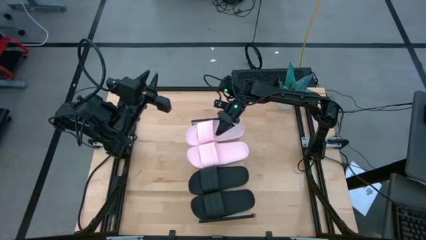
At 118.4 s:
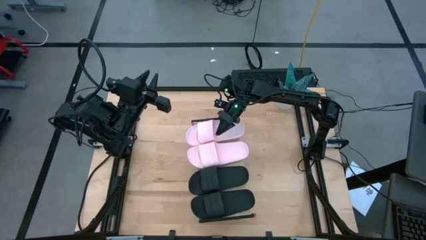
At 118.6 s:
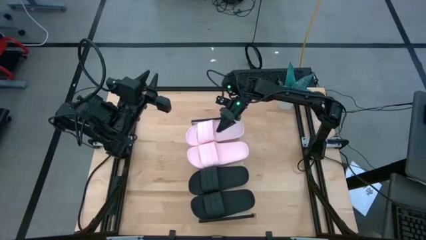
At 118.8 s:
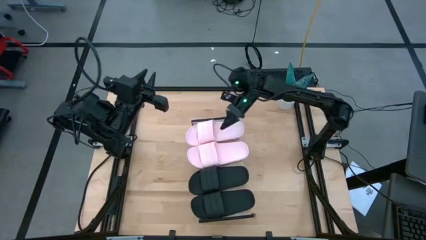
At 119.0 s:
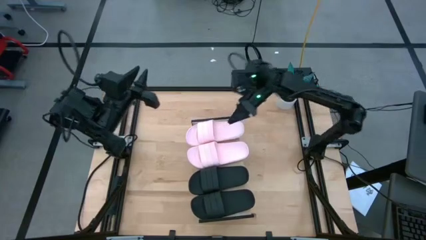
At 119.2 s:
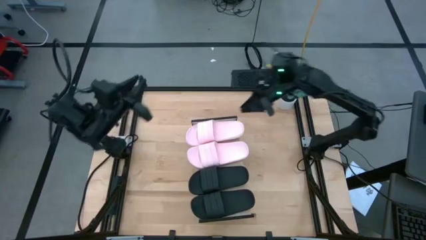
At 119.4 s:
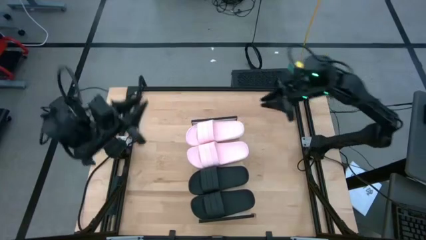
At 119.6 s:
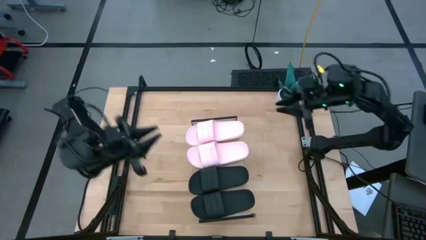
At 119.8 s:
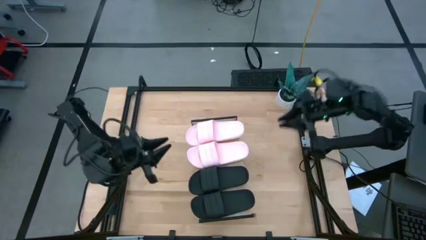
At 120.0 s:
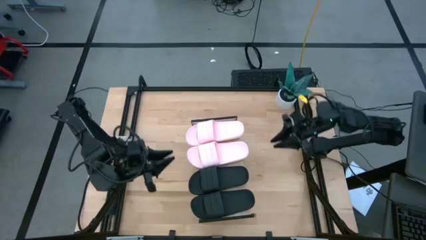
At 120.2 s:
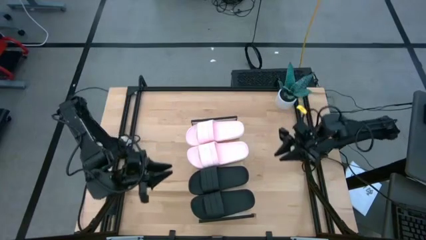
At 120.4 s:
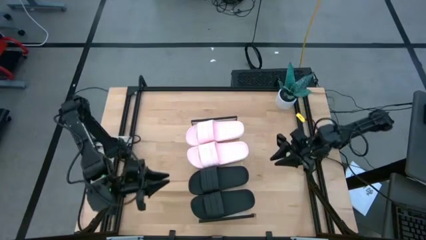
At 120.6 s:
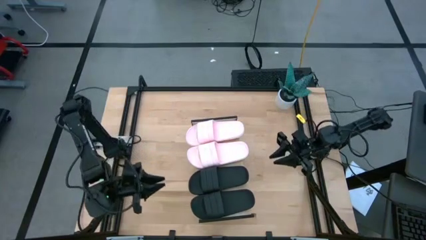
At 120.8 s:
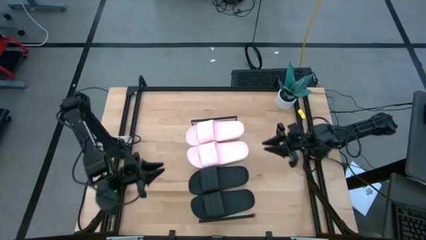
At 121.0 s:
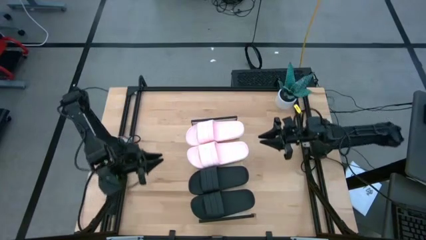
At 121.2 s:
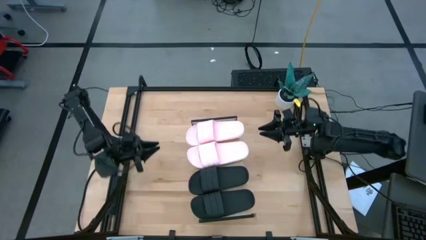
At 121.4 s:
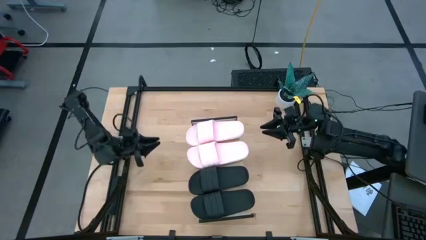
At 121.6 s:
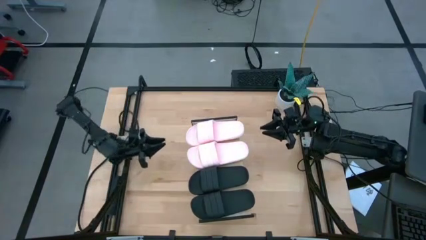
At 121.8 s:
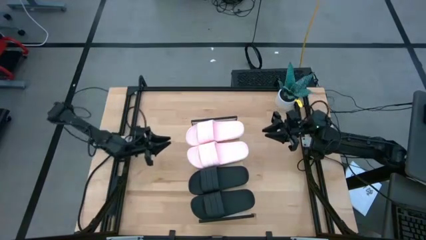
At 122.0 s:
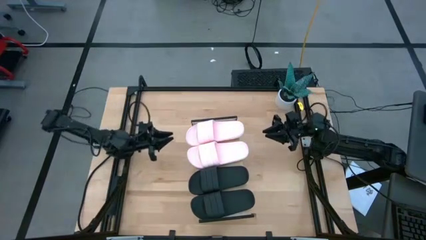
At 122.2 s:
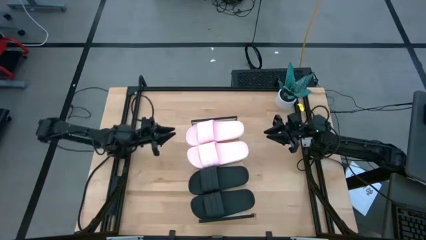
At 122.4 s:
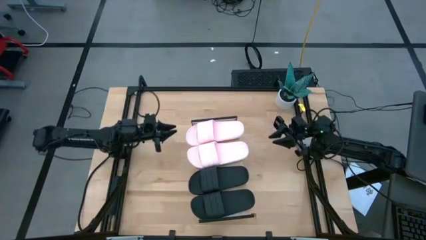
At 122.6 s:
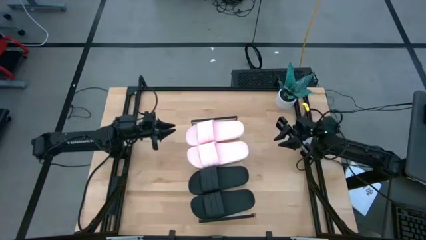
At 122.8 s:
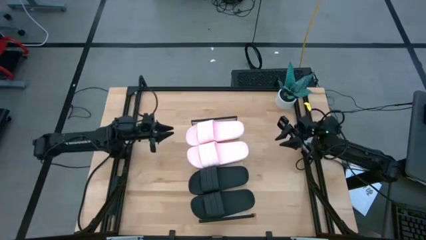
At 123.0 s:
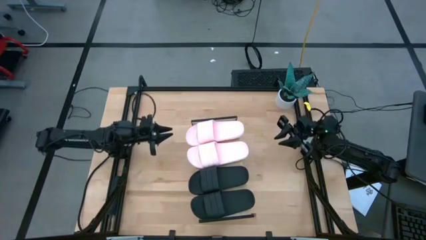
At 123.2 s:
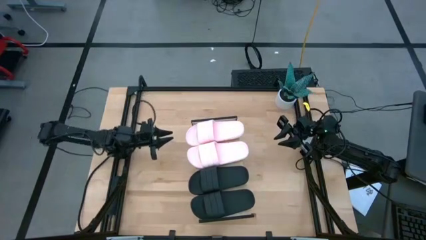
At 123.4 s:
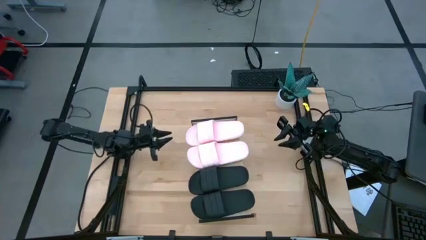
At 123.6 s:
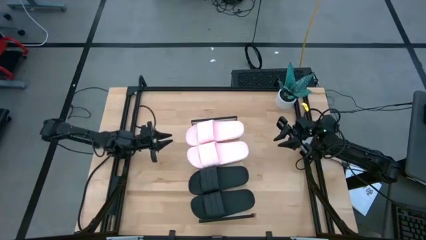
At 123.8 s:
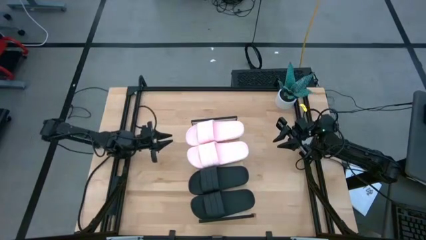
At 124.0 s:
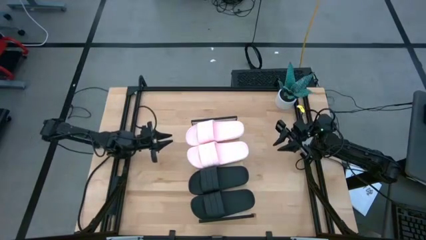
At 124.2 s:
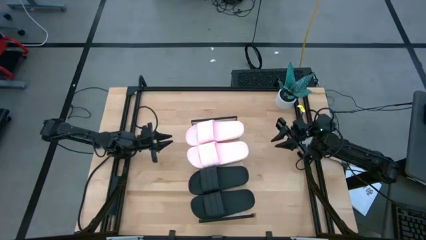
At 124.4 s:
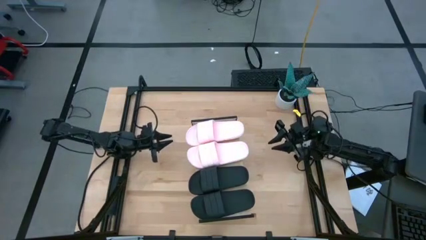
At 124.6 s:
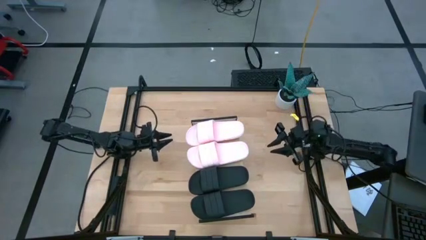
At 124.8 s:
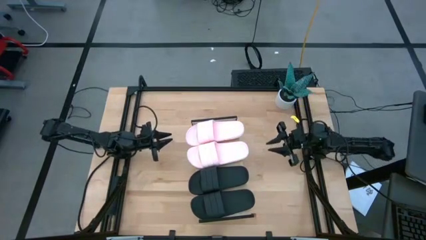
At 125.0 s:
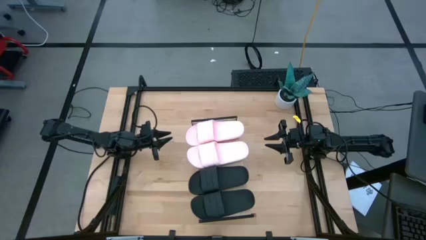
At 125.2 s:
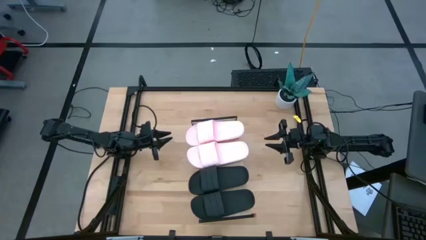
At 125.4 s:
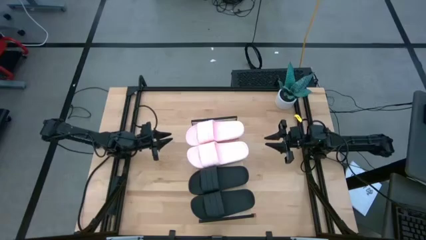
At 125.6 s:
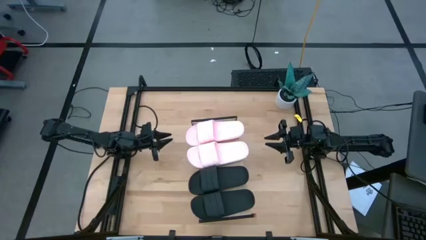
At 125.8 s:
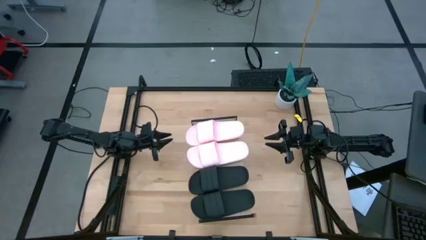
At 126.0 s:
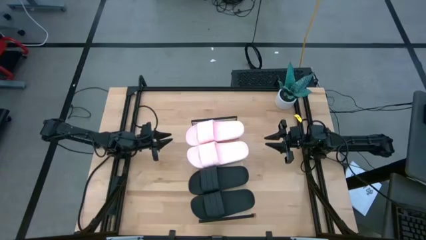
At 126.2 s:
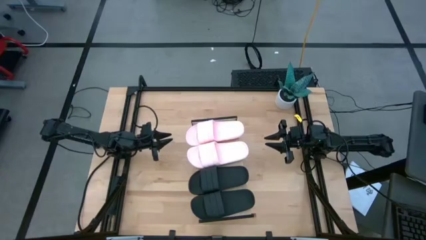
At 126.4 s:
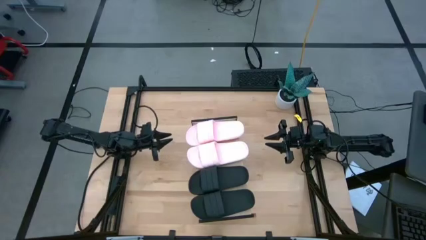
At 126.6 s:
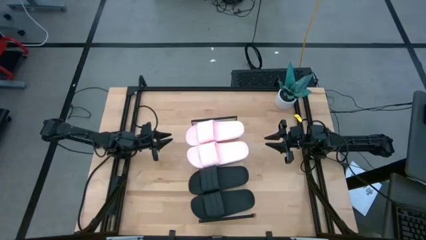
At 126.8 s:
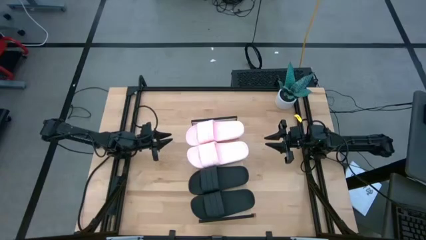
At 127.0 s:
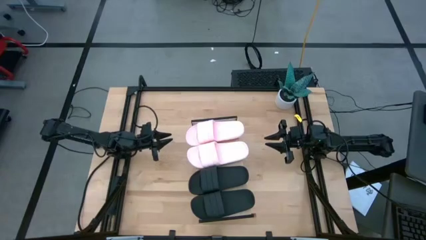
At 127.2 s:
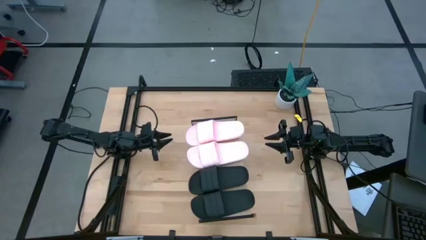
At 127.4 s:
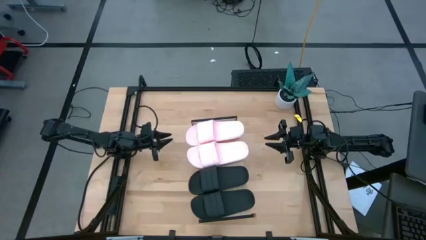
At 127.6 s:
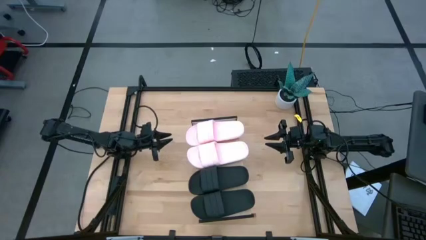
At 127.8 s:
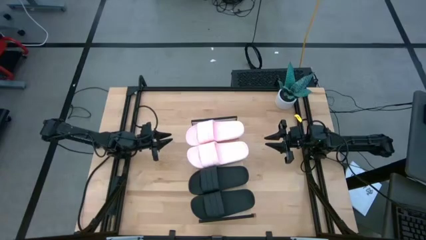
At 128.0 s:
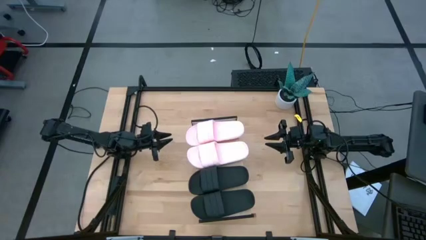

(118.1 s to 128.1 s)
Task: Pick and place slides into the shelf
Return to Home Position

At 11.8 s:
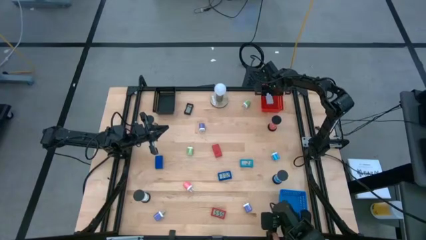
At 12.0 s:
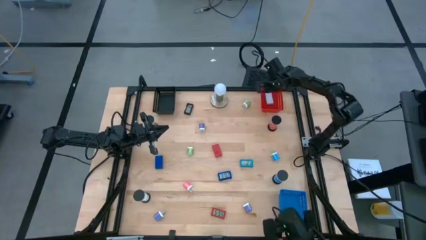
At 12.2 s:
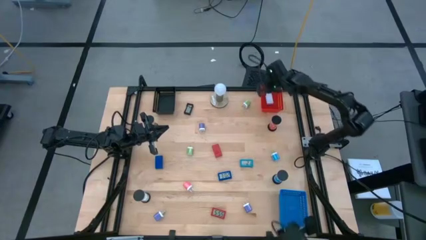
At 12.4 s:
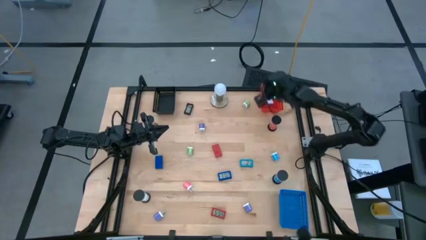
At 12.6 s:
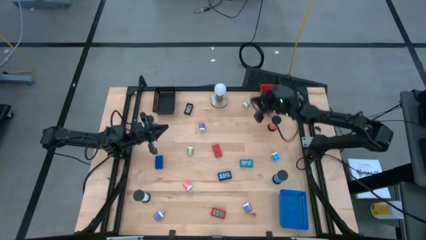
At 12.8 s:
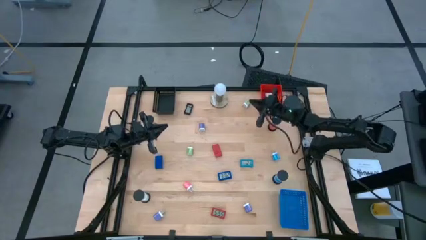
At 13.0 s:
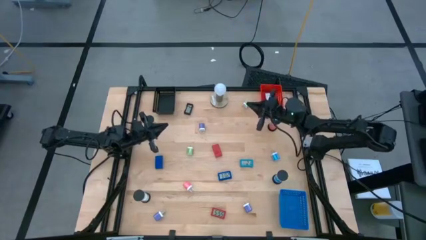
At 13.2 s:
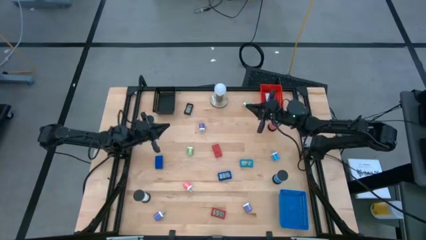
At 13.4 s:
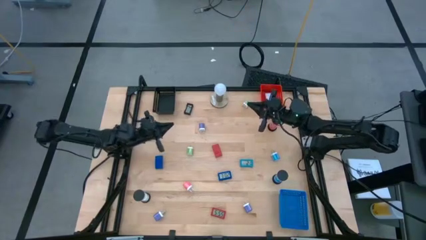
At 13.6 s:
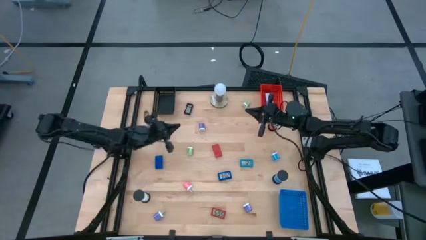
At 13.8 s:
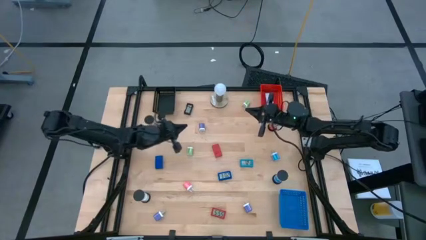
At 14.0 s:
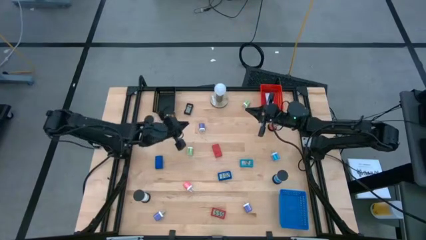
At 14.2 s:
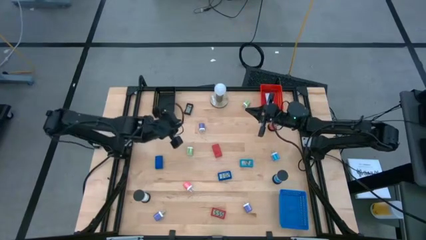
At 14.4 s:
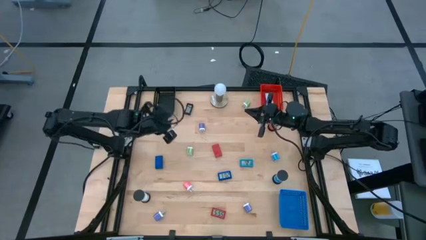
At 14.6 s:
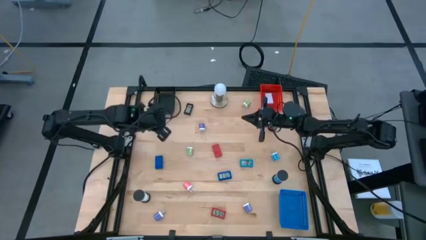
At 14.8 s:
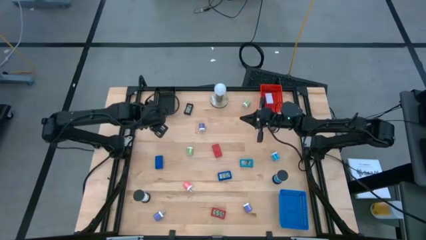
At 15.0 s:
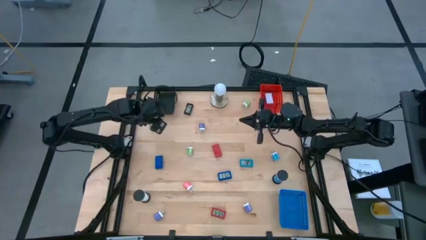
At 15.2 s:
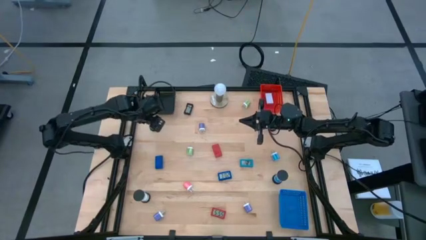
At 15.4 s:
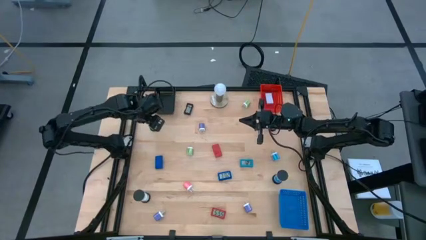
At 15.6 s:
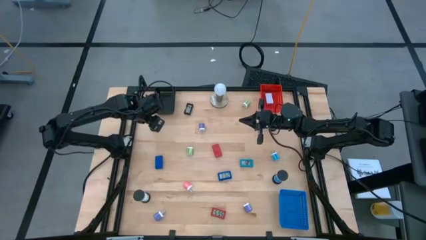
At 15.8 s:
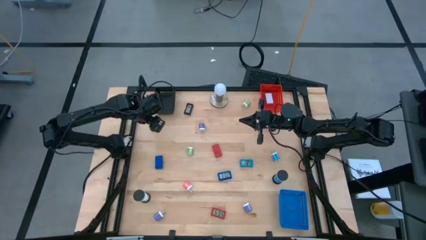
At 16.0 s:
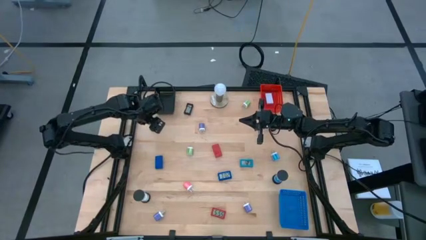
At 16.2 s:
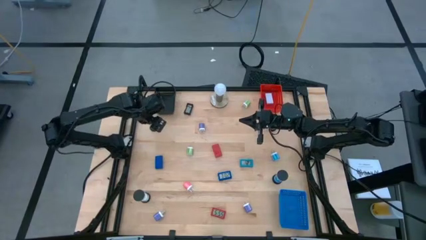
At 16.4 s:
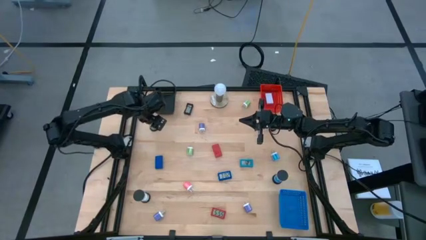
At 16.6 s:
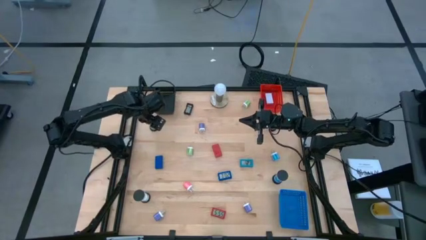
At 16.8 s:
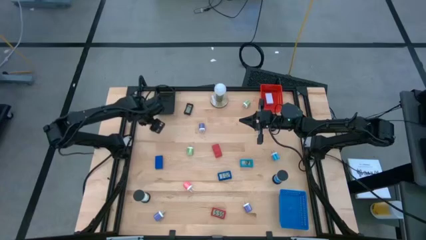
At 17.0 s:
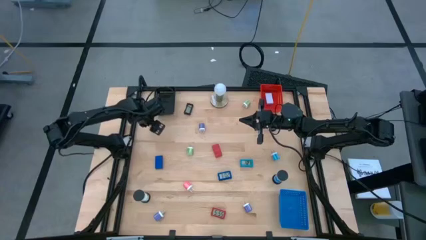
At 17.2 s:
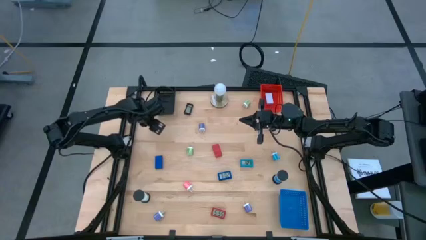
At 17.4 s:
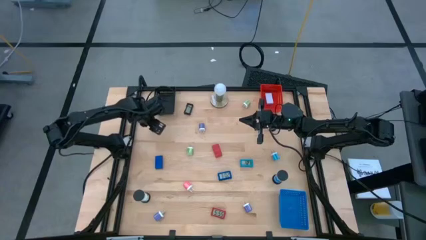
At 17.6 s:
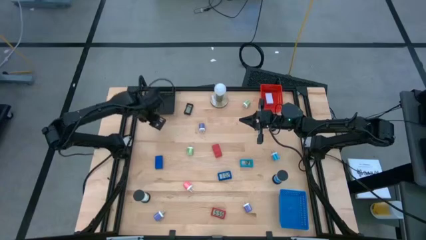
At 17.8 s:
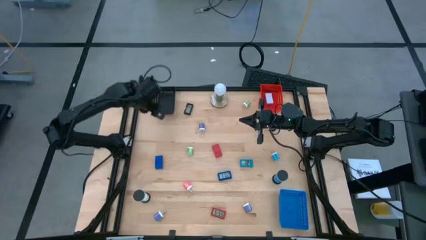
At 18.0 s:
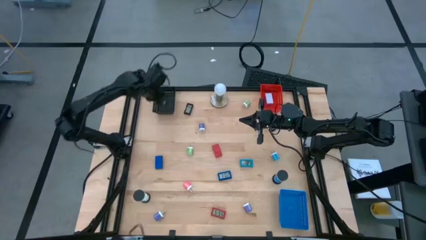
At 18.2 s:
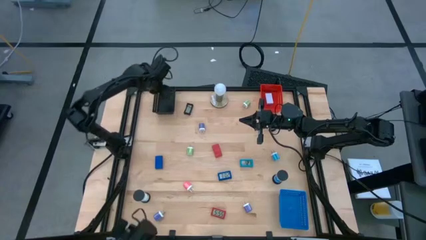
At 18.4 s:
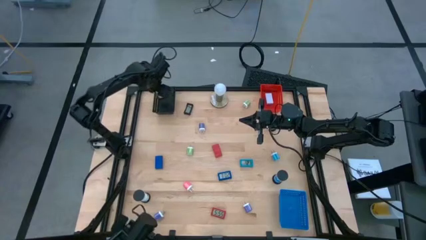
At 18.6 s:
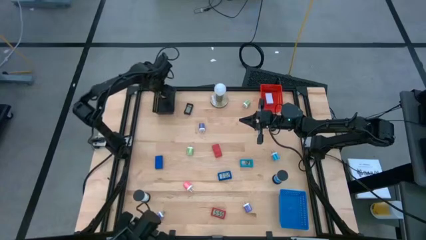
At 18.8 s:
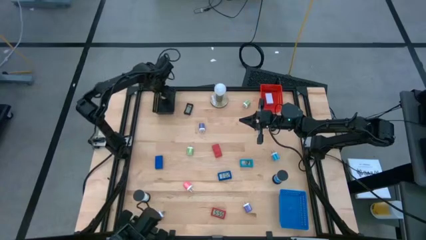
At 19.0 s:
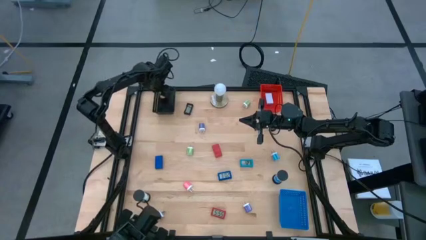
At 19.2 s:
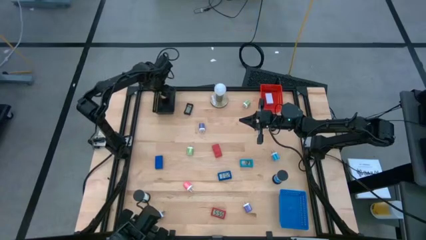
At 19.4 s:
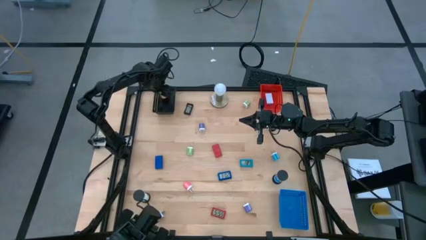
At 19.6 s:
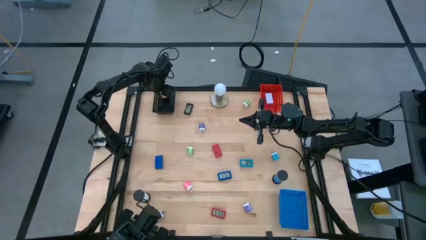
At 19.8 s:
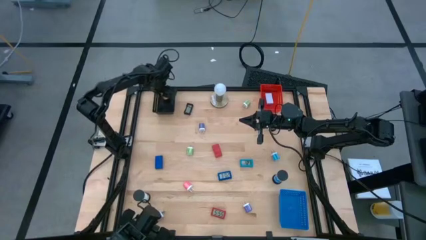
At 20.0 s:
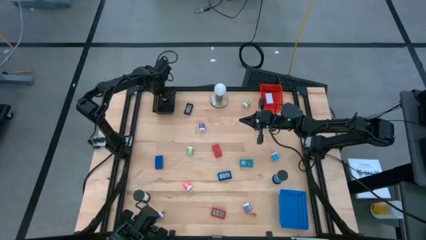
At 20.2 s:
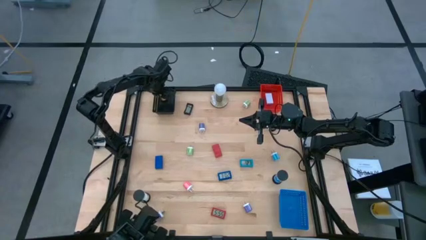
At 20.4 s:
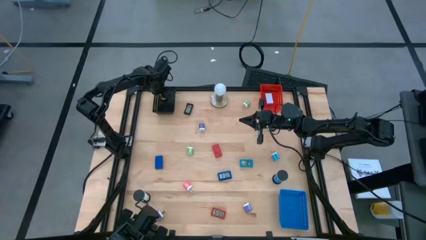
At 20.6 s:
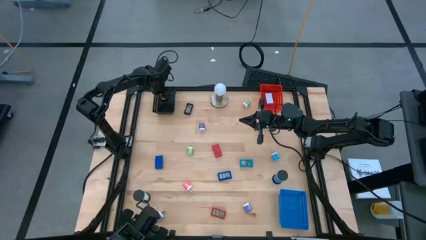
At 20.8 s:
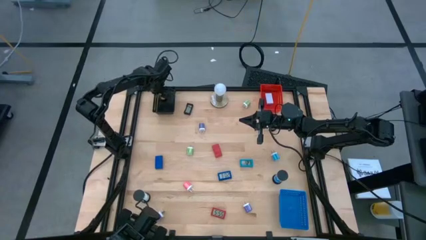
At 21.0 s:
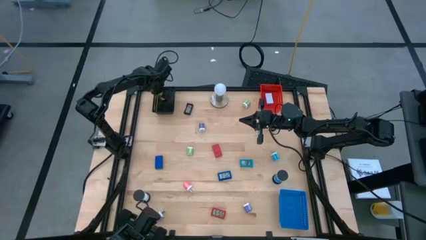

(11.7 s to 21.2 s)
Task: Pick & Place Office items
Put the yellow hourglass into the black bin
